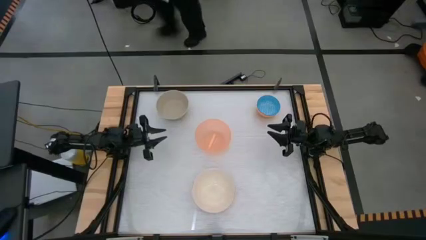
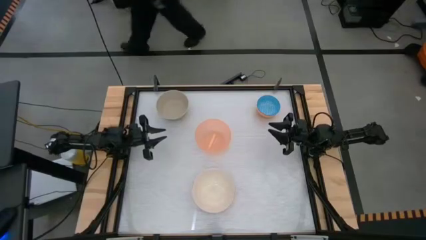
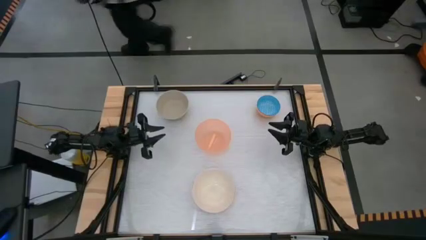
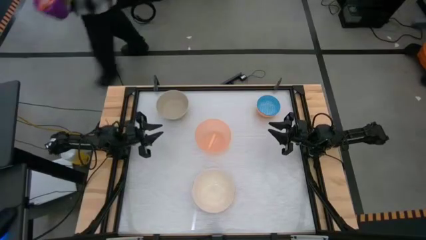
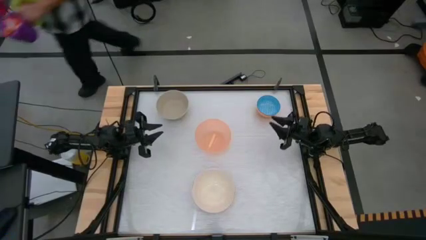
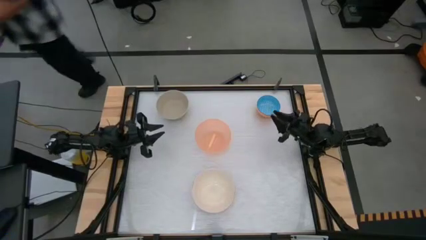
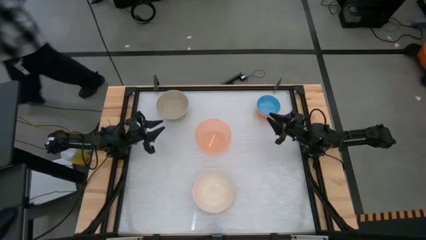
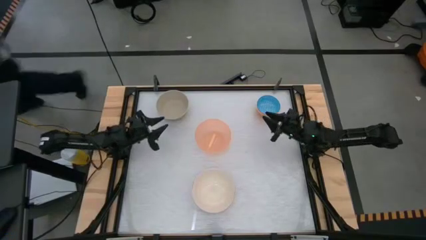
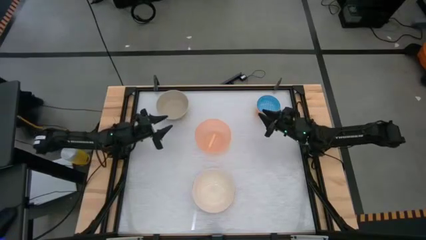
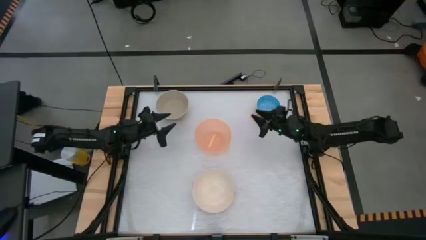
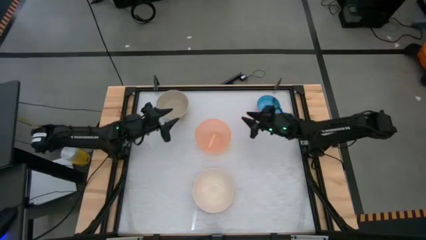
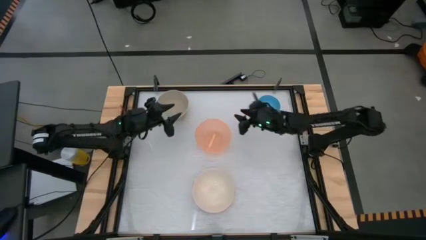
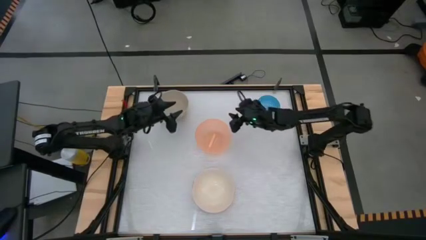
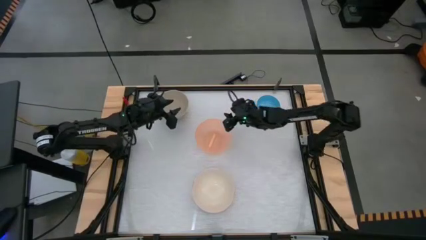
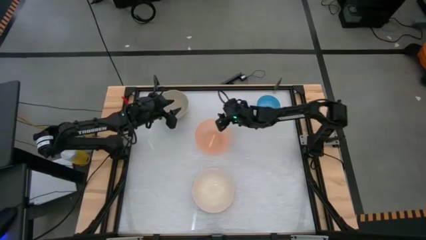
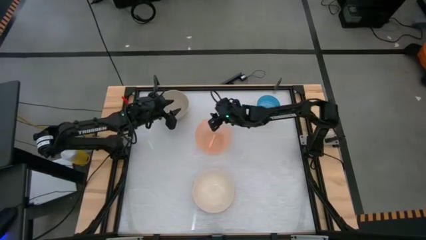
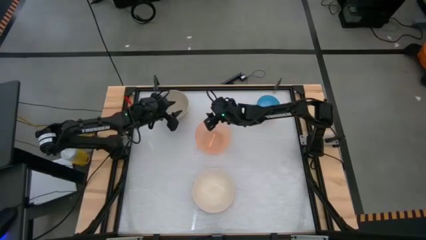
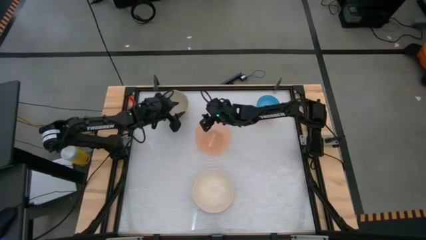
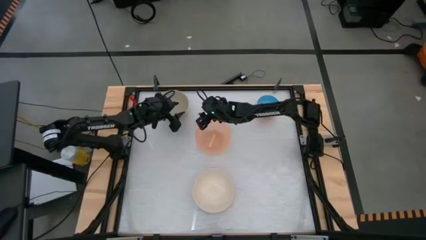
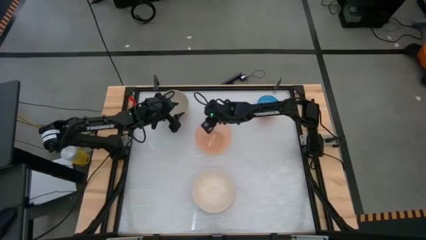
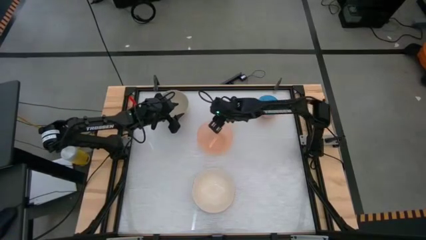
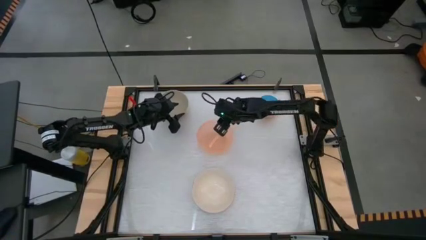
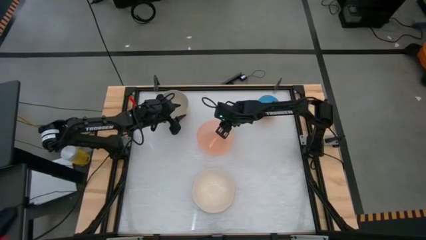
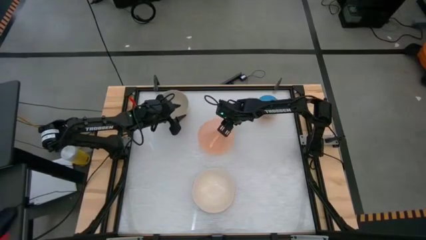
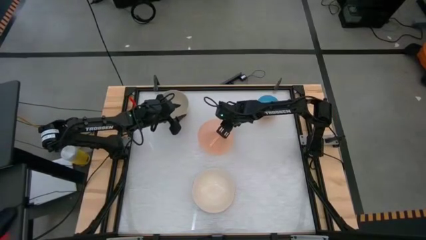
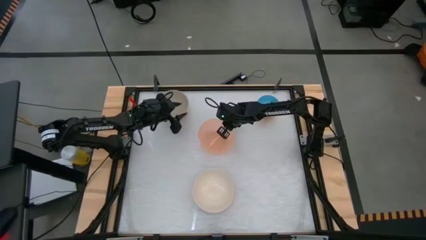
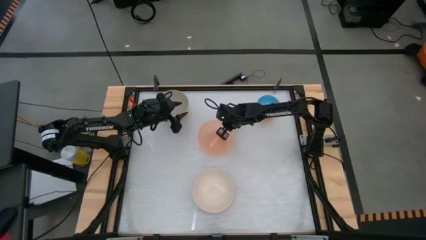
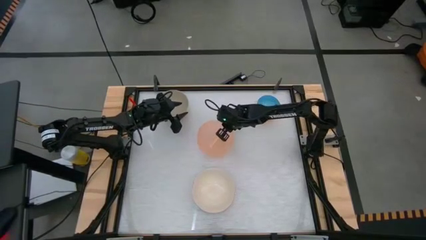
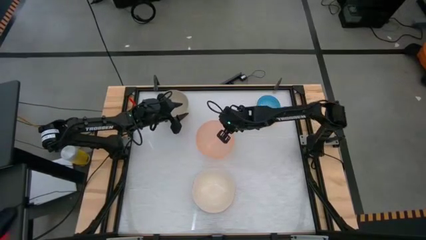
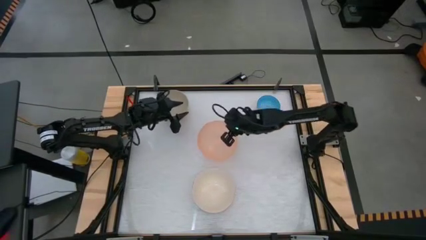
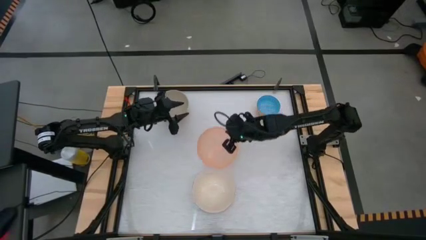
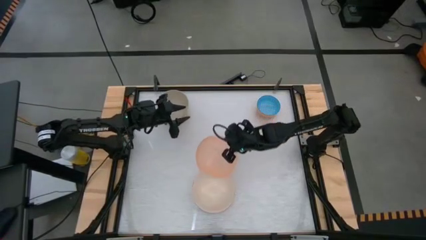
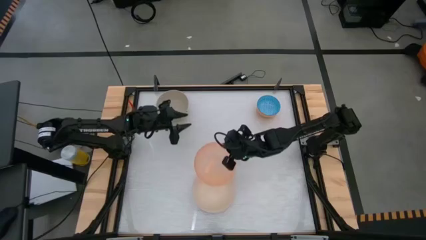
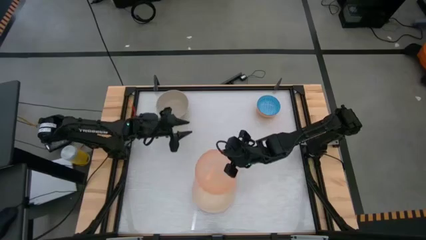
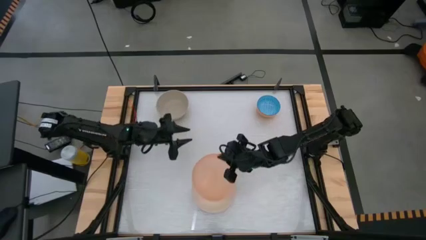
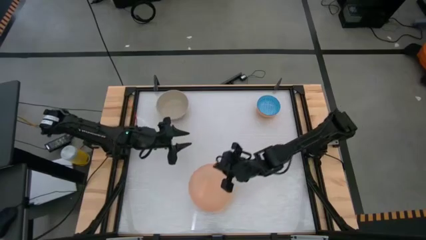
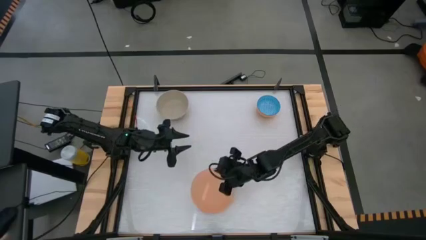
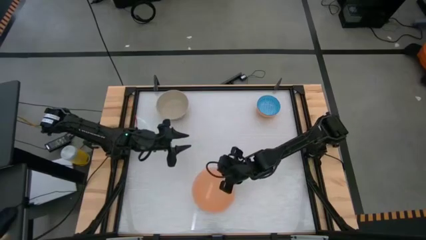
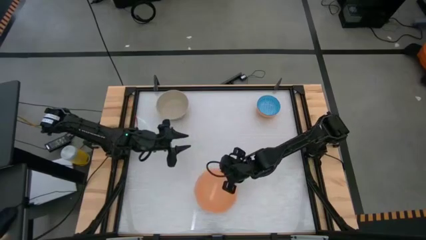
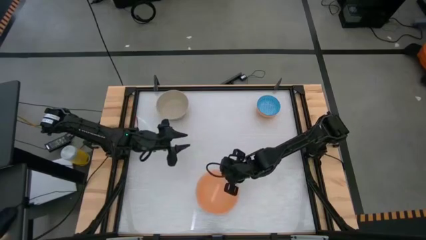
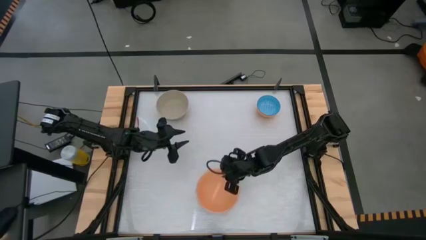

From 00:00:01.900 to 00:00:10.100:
Stack the orange bowl on the white bowl

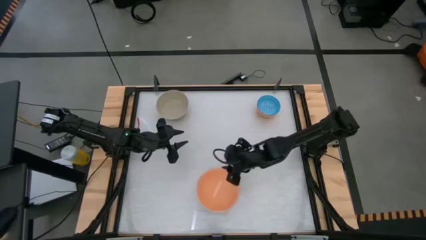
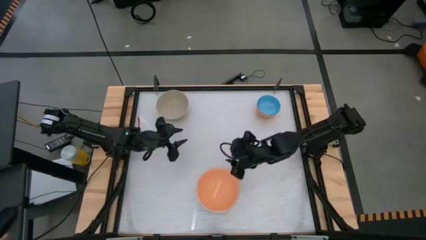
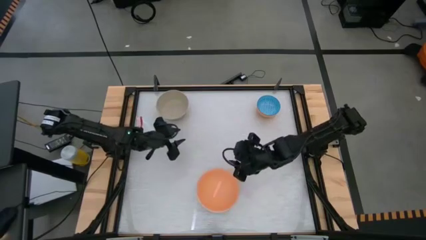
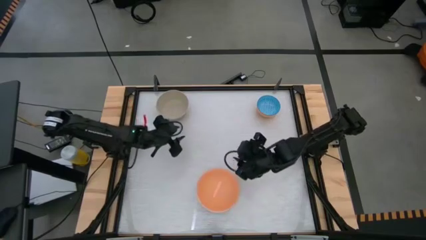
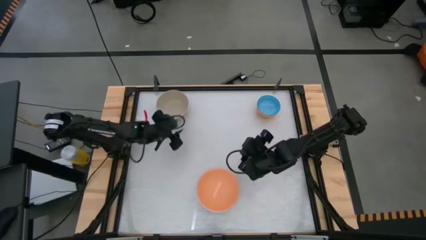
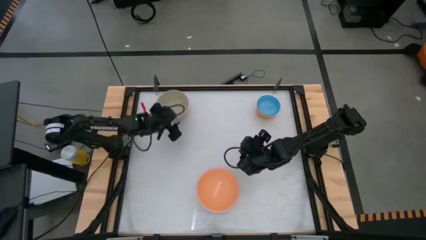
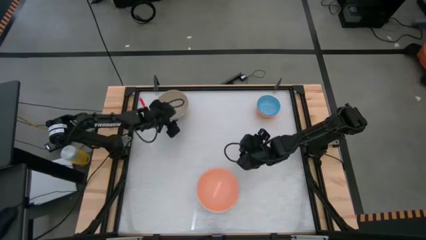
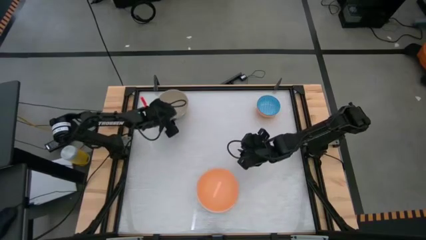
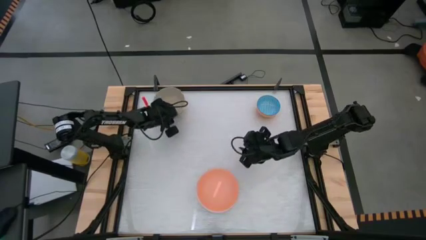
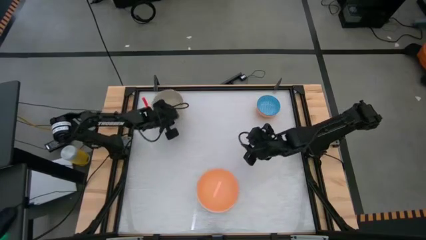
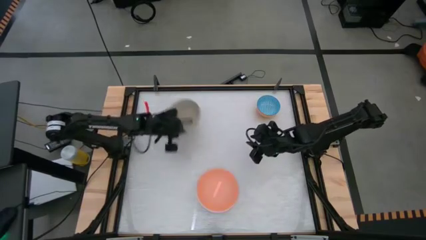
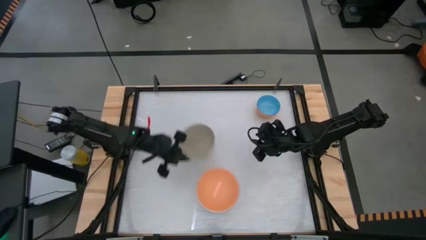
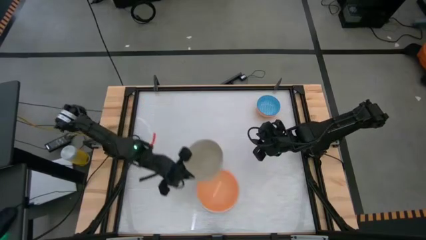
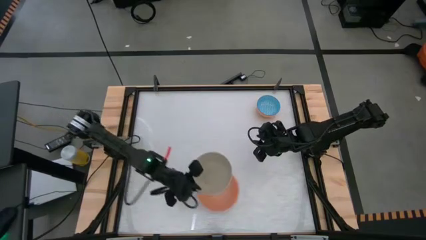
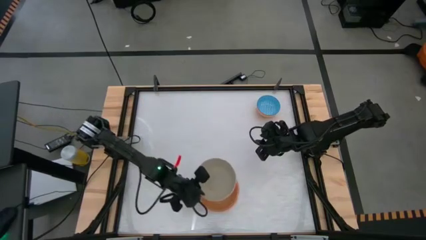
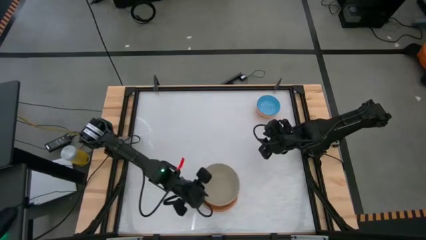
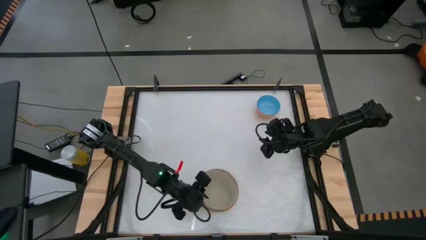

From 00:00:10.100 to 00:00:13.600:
Stack the gray bowl on top of the orange bowl

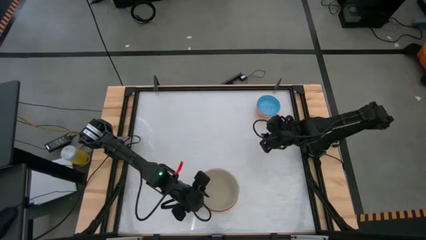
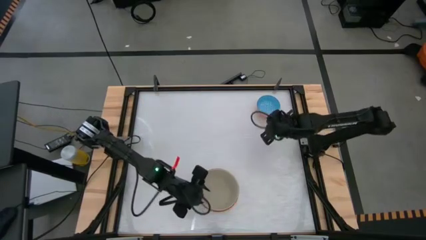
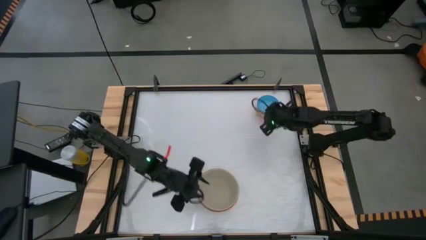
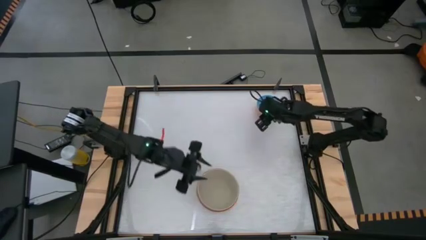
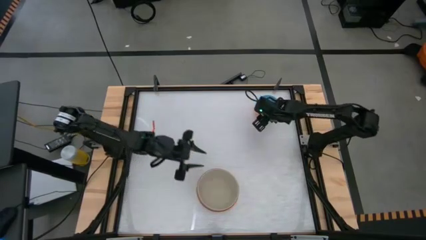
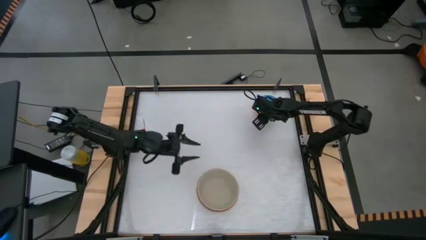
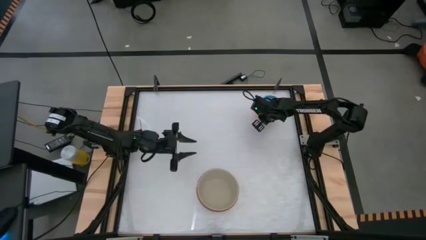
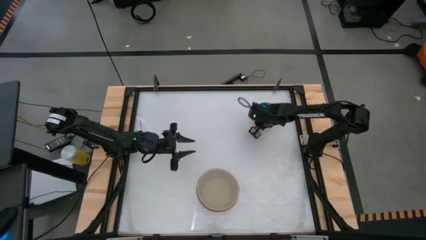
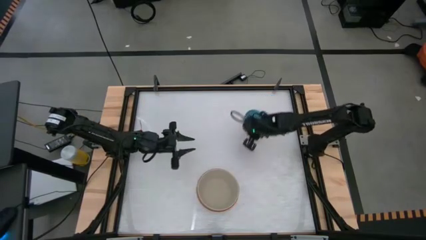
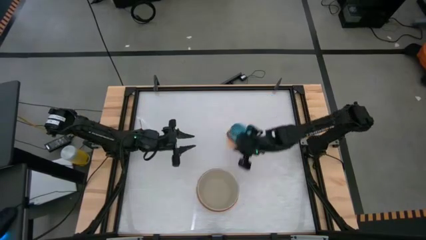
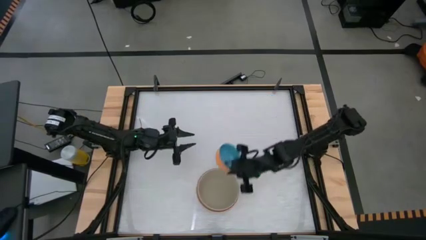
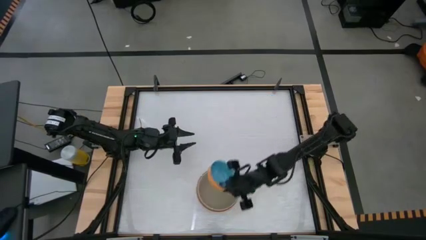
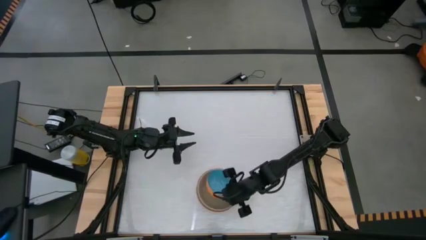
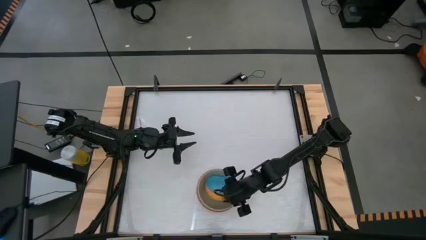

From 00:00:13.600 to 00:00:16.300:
Stack the orange patterned bowl on top of the gray bowl
